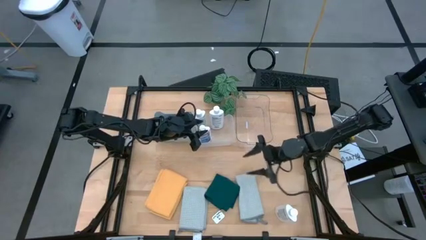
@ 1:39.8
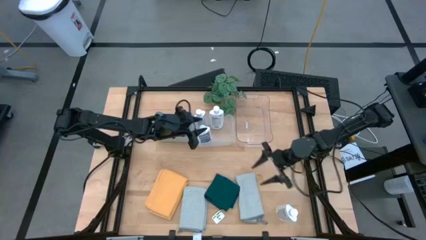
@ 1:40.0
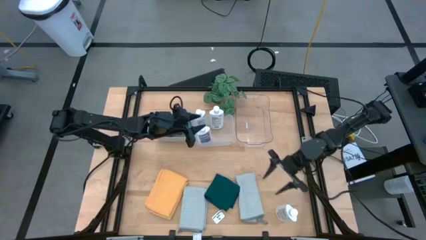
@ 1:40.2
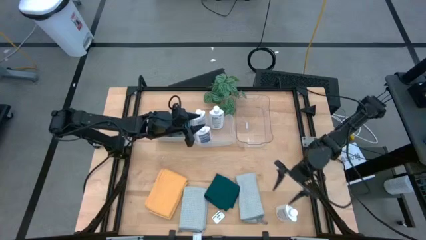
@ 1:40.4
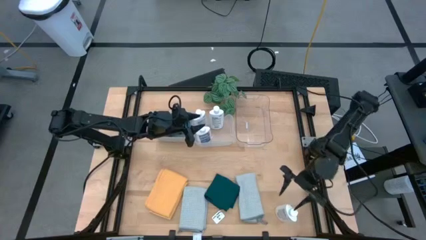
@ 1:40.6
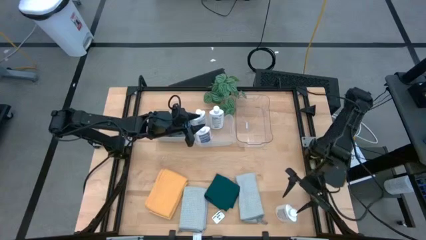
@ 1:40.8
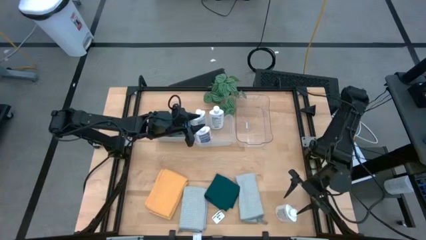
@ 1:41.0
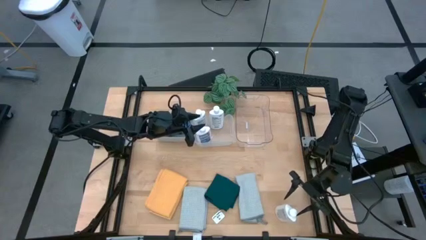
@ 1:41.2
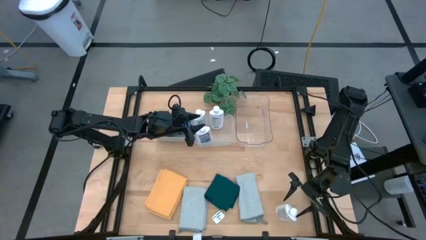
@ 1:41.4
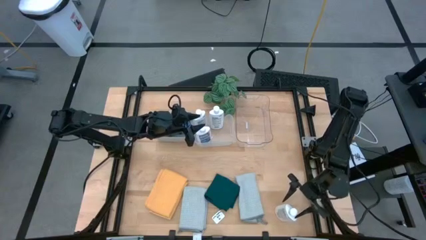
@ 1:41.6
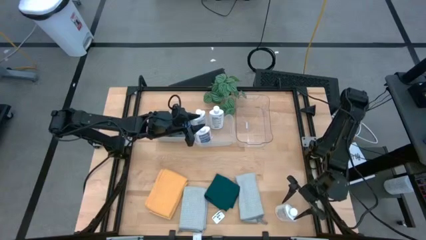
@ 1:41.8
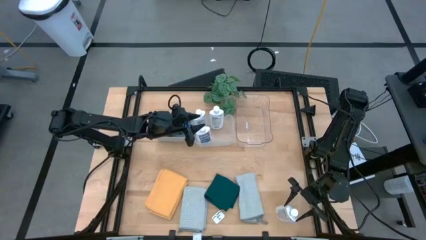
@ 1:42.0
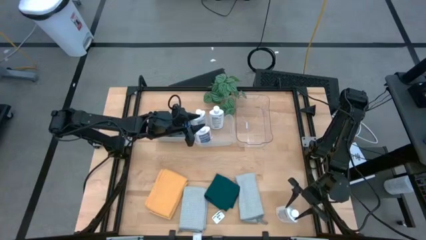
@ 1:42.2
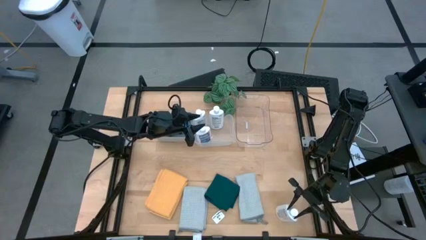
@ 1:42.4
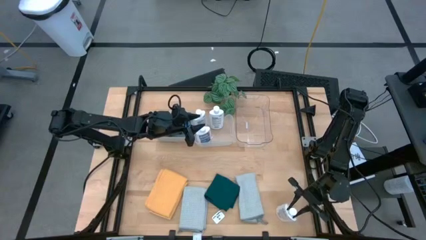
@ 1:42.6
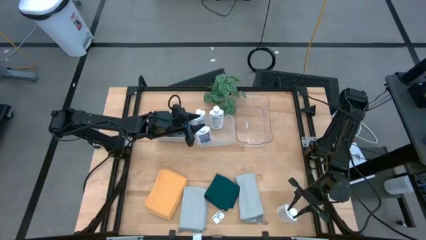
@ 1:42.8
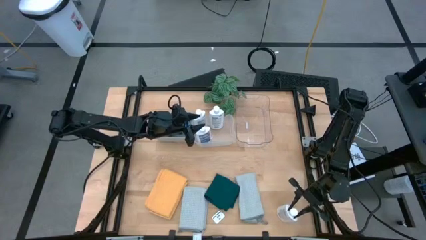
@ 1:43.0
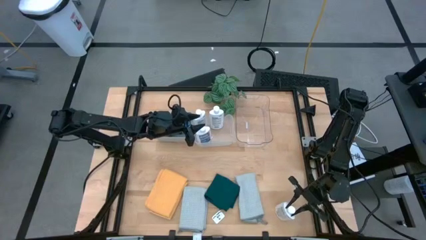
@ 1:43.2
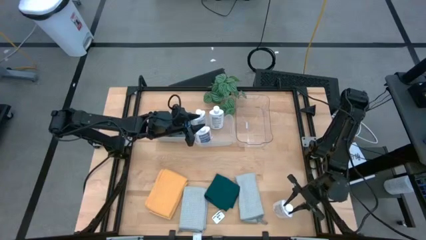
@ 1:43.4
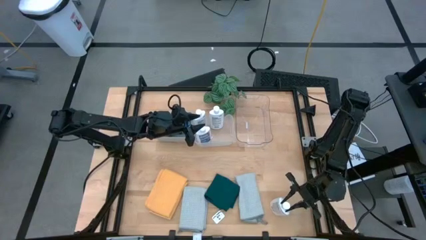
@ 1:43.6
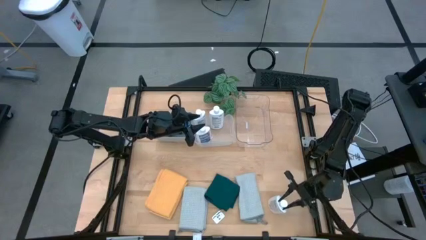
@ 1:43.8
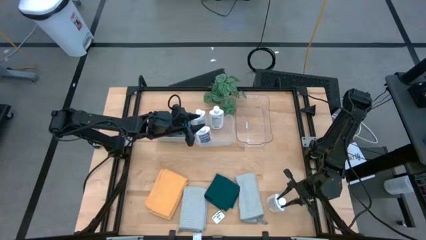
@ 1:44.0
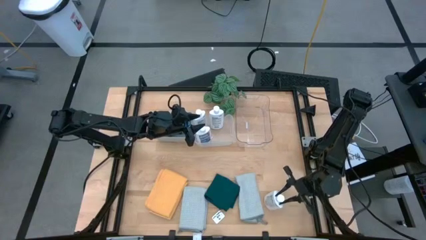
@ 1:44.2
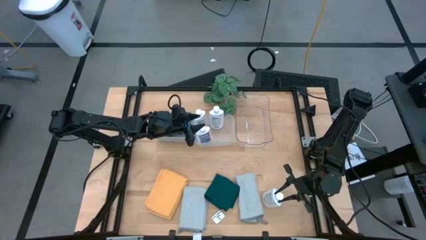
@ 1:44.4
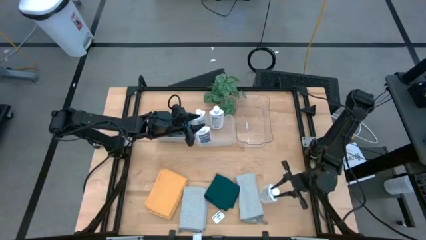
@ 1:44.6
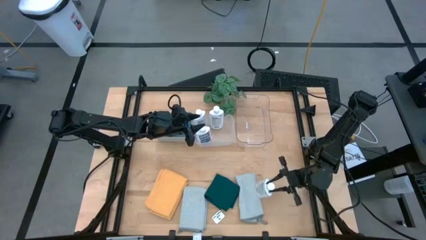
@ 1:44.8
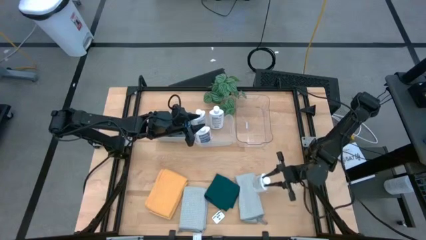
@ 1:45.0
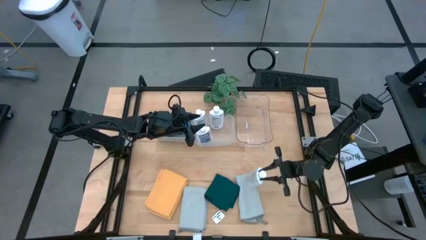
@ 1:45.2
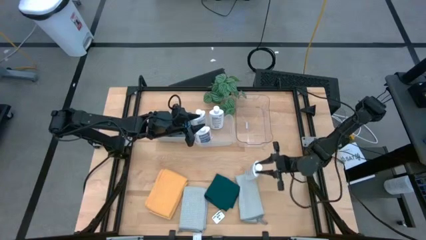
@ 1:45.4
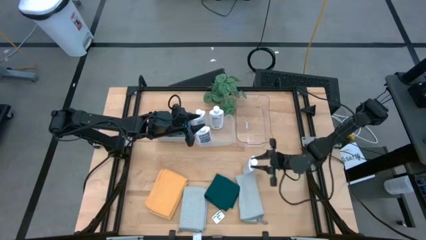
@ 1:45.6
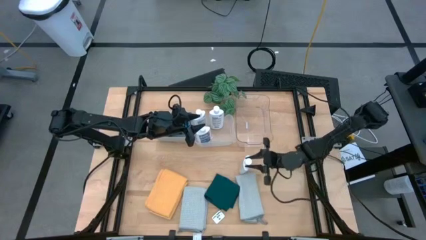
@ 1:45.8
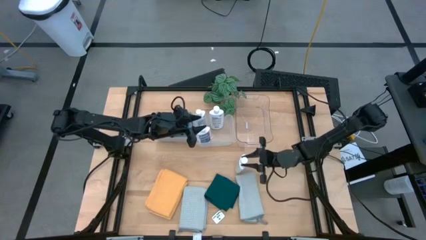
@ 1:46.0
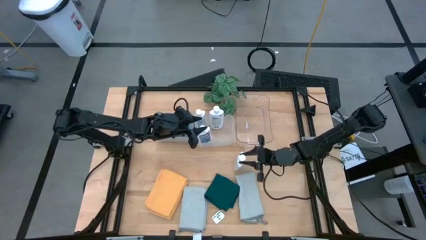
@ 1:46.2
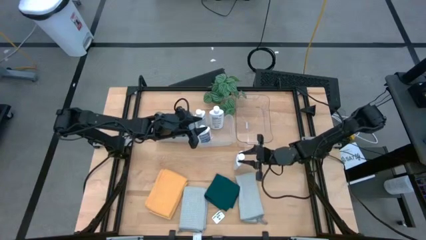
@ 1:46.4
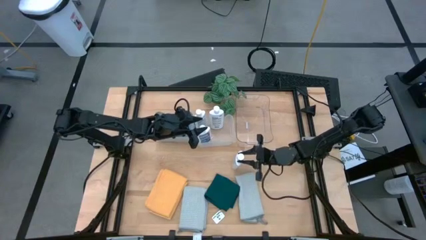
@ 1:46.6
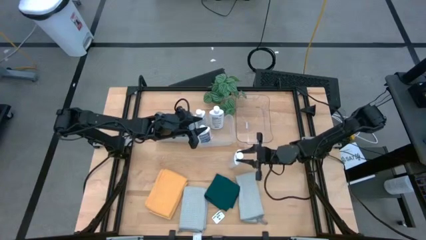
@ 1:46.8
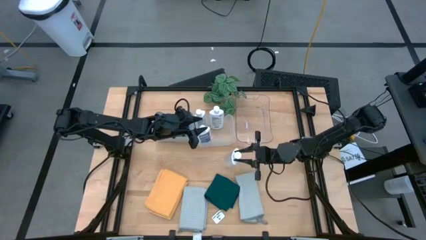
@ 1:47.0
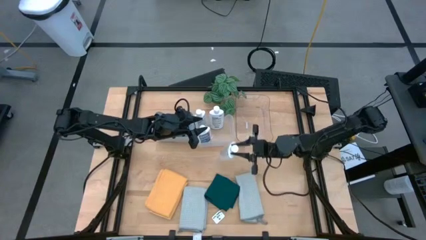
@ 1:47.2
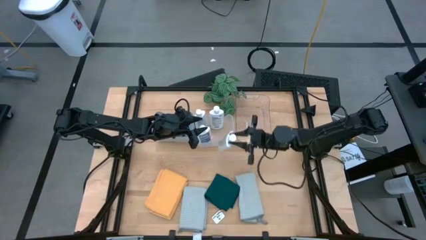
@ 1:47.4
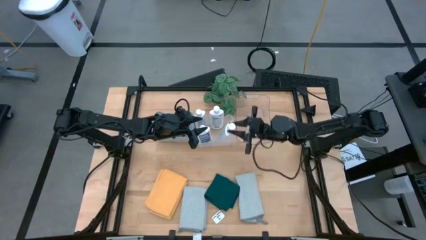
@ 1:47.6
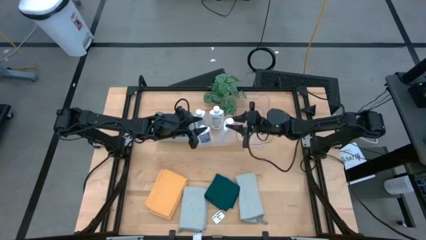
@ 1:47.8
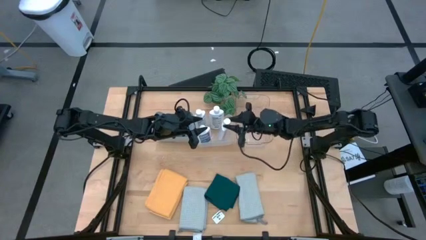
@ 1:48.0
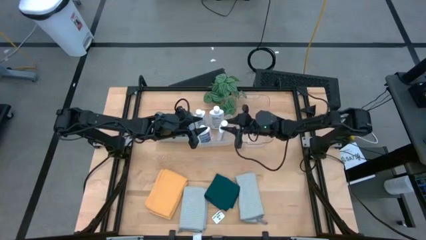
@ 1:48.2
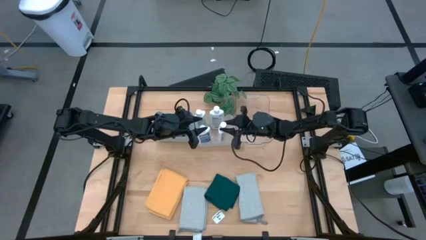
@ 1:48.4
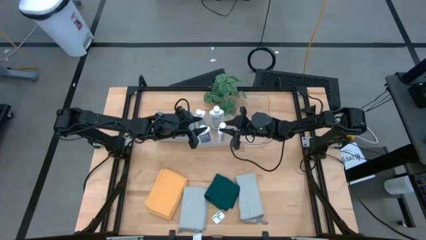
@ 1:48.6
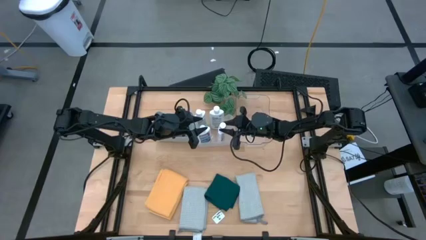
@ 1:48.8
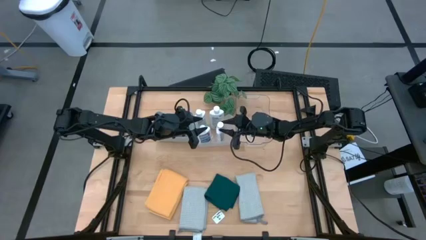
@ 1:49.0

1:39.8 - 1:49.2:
Task: Pick & Place Kitchen Items
Put the white plastic restorer bottle into the white bin

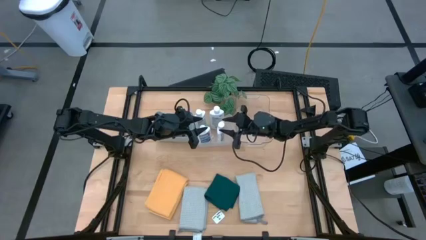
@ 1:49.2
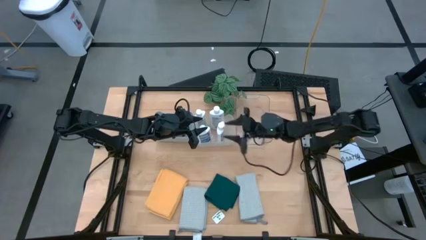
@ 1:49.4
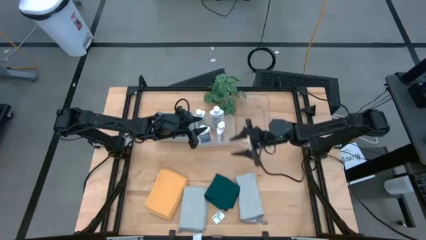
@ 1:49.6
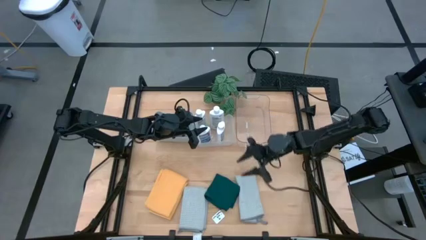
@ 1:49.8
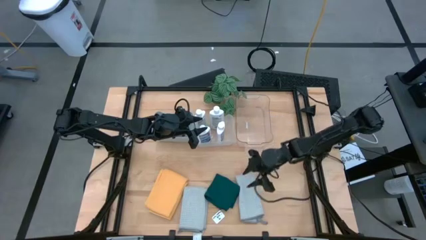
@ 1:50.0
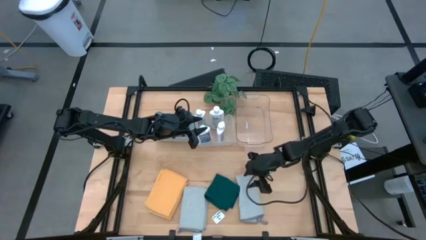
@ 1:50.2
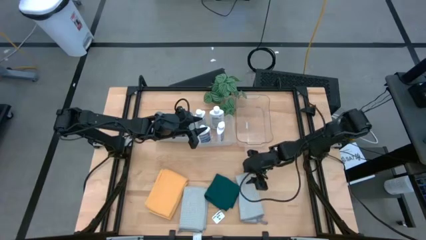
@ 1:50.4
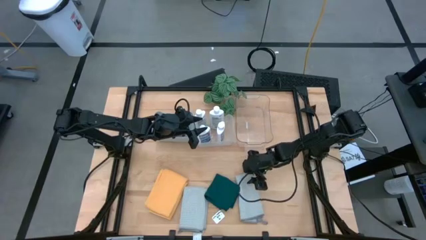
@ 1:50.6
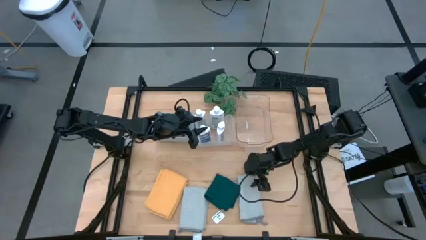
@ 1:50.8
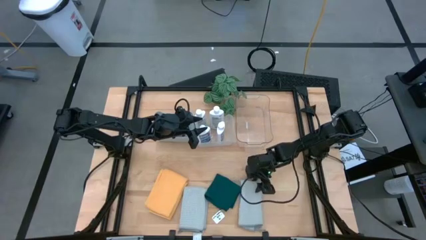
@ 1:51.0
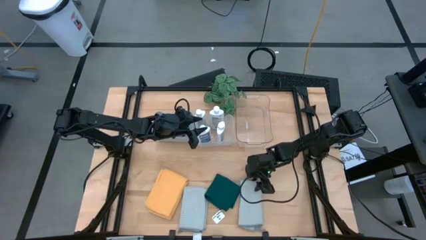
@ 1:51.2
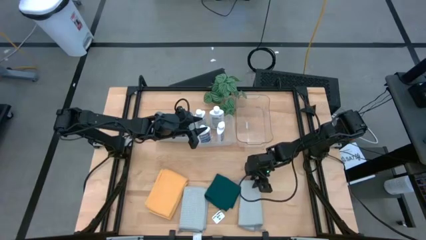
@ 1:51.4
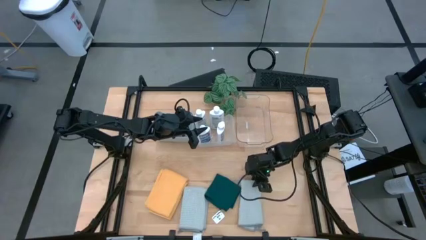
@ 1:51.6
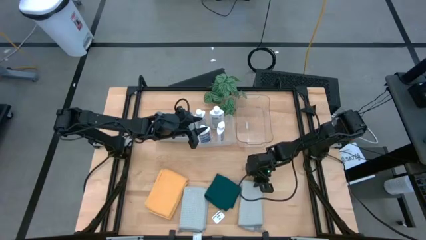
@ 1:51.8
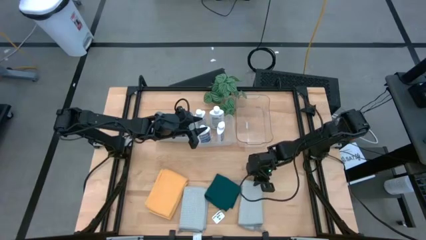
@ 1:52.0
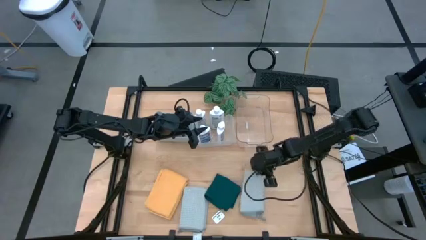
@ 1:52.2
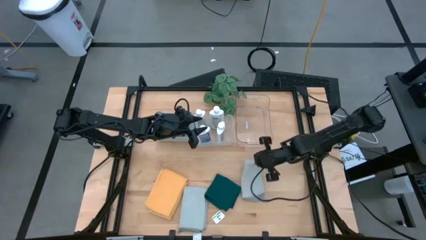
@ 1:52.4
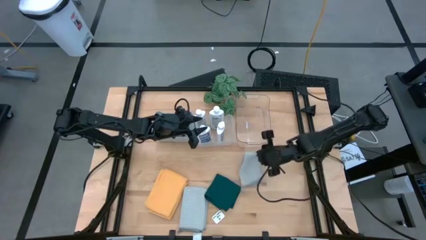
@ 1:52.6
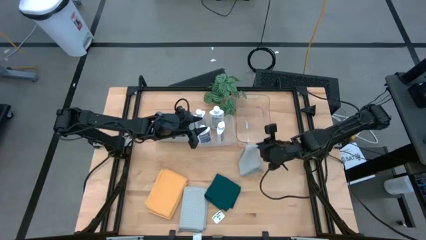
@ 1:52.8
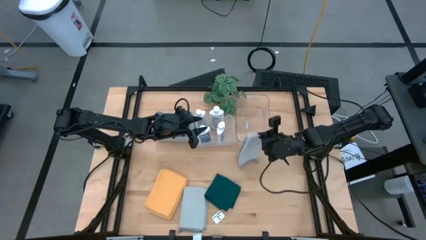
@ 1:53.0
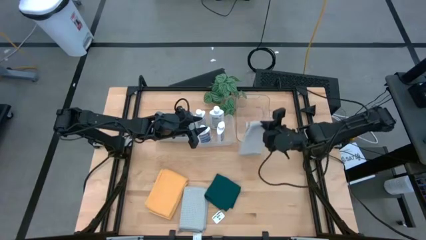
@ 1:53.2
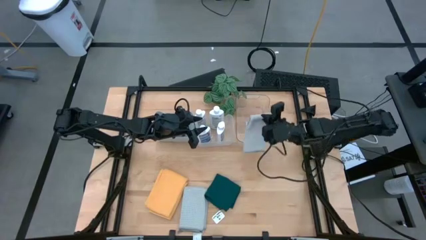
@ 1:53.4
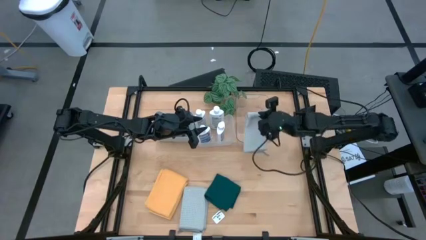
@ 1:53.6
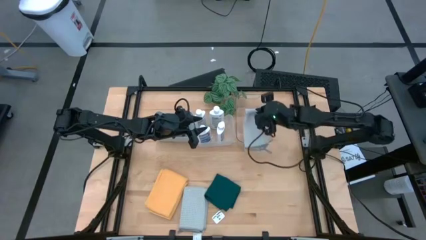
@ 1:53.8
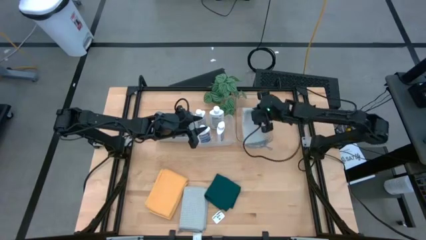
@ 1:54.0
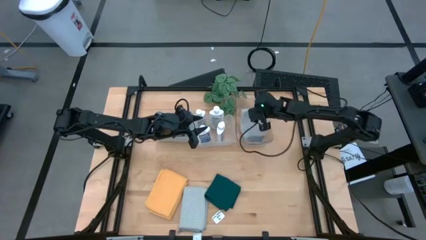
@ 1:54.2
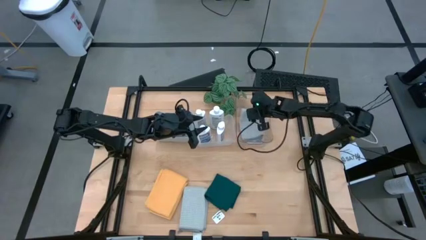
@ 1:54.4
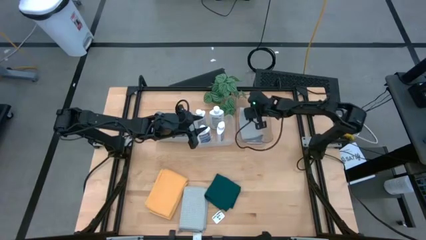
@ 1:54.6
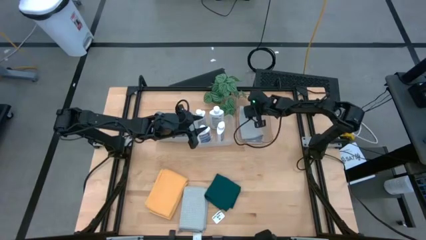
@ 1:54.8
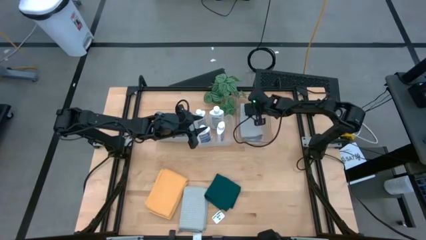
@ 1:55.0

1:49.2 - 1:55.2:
Put the right gray towel into the transparent bin

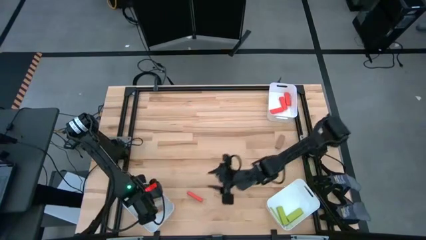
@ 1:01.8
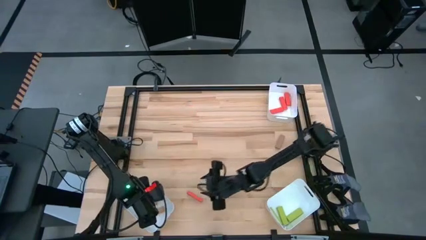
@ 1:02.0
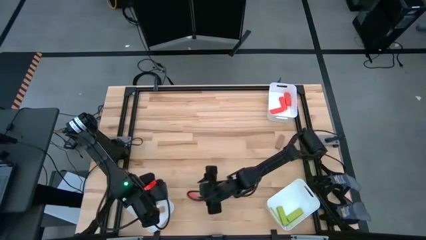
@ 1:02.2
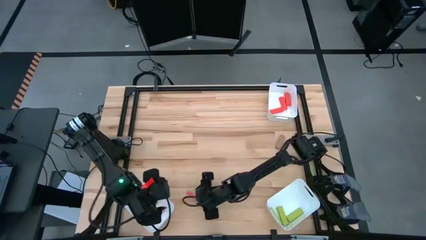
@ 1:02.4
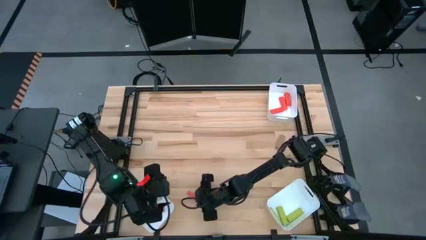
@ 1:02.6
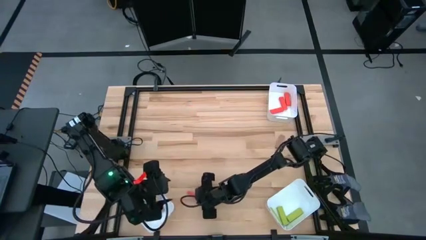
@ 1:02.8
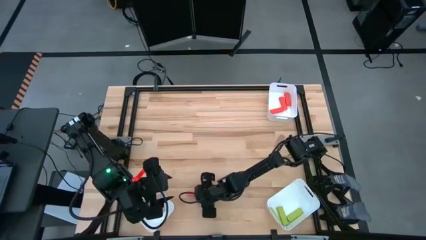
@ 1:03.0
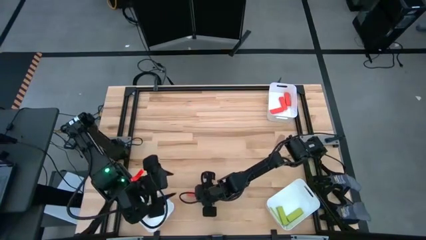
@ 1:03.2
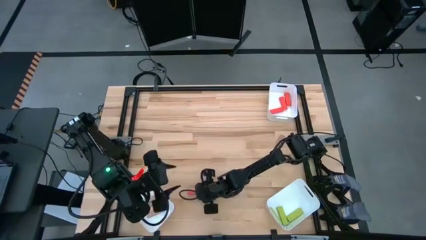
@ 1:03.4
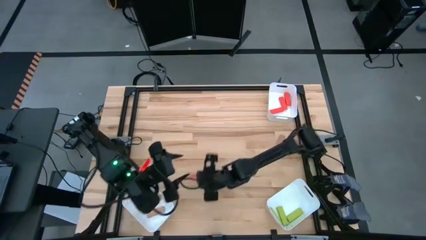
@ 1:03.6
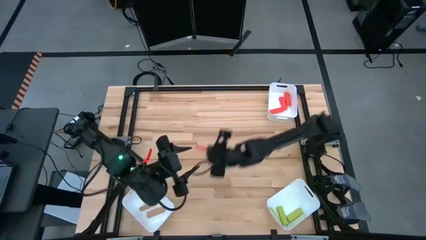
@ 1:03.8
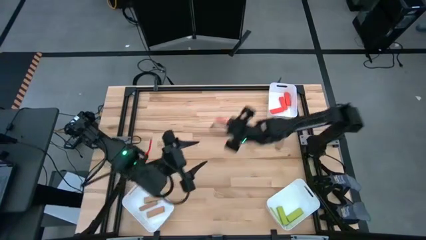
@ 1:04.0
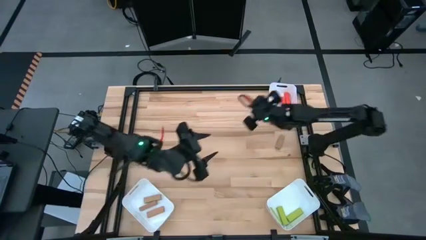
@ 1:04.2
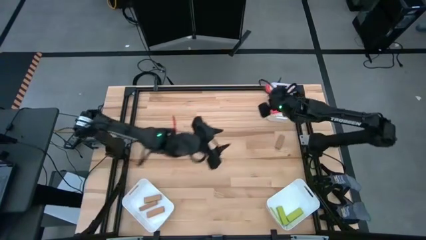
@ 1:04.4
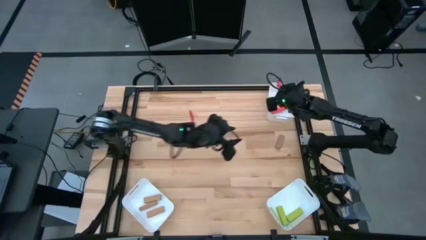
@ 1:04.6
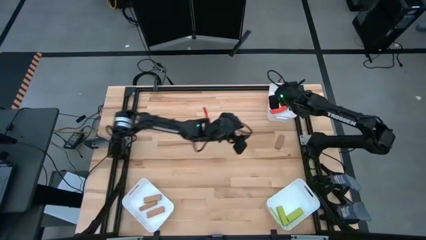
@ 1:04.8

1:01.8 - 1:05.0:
Task: Sort blocks
Put the orange block into the top right bin
